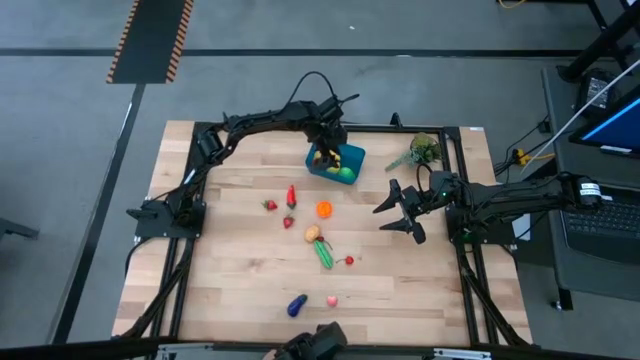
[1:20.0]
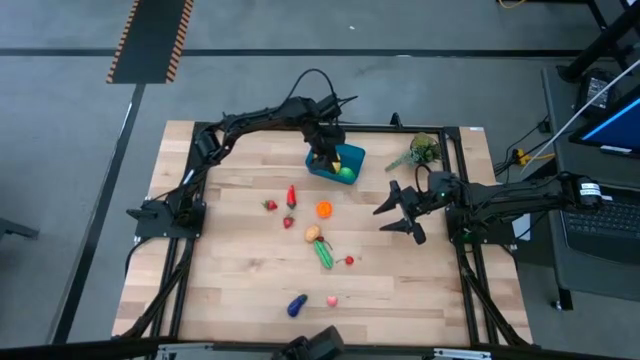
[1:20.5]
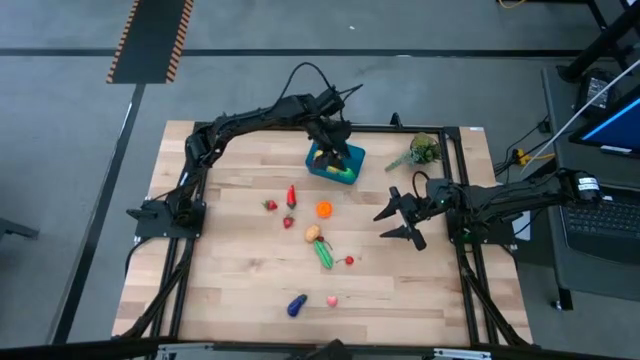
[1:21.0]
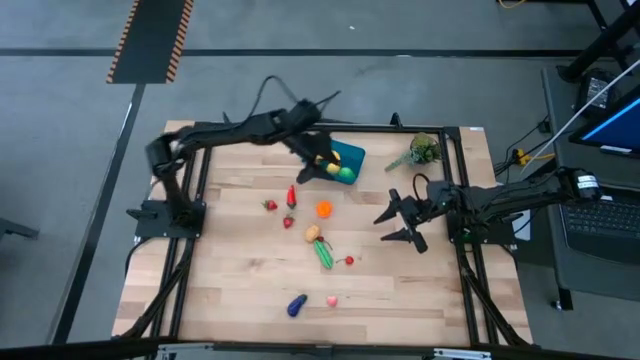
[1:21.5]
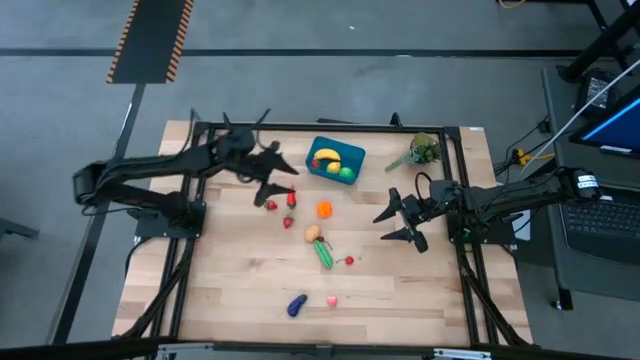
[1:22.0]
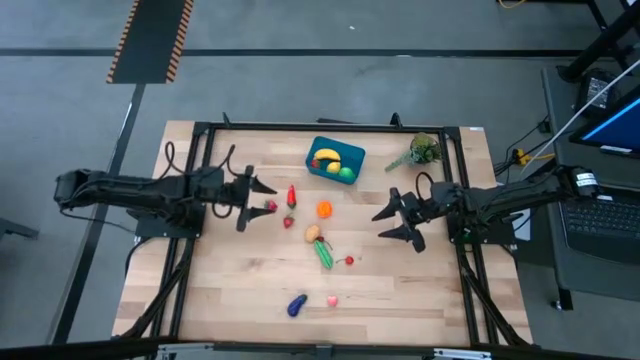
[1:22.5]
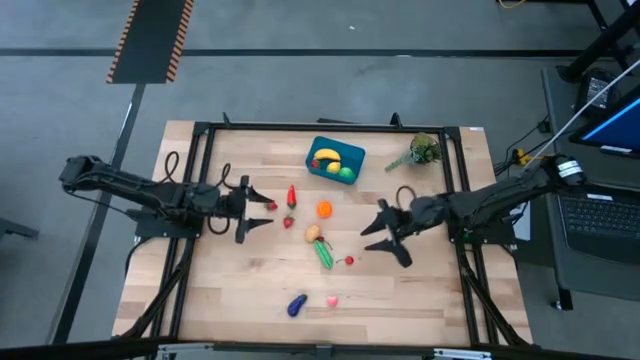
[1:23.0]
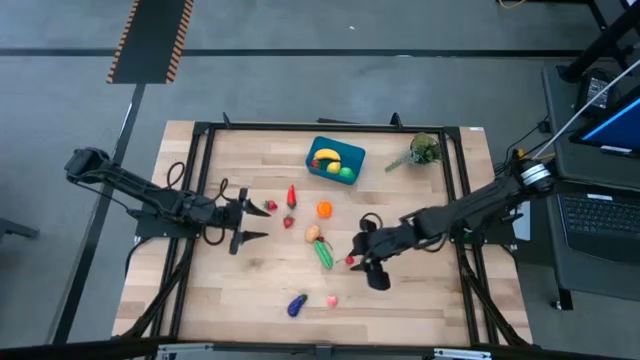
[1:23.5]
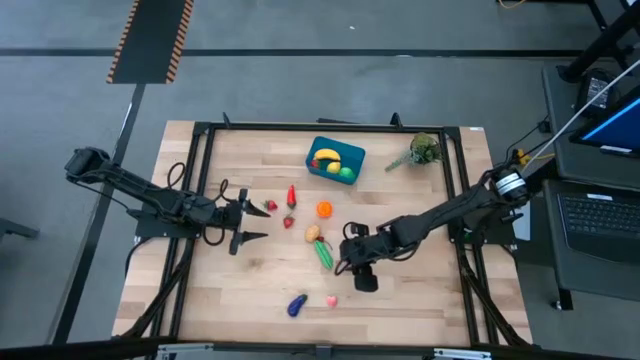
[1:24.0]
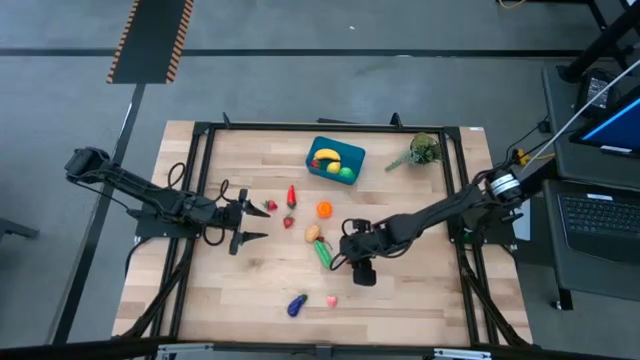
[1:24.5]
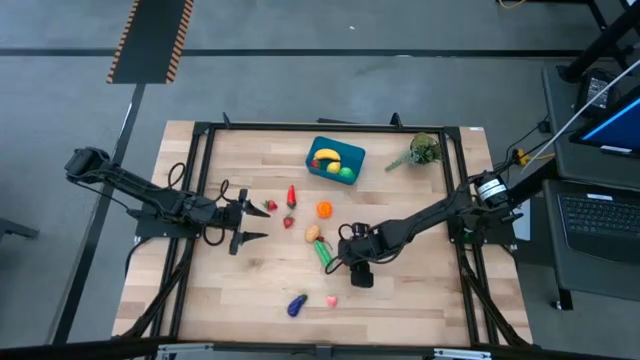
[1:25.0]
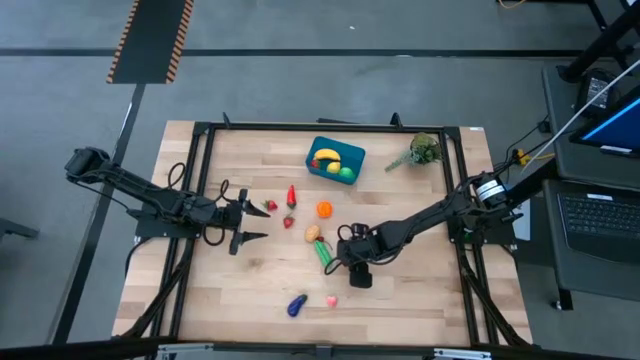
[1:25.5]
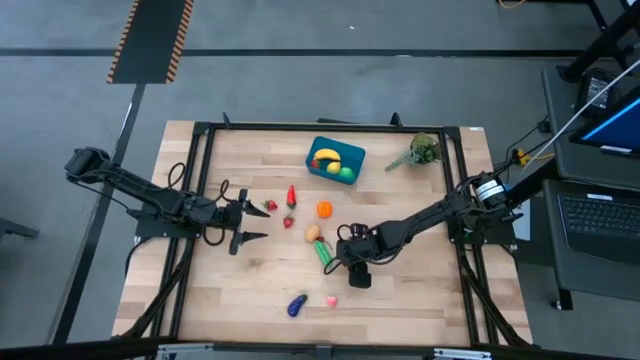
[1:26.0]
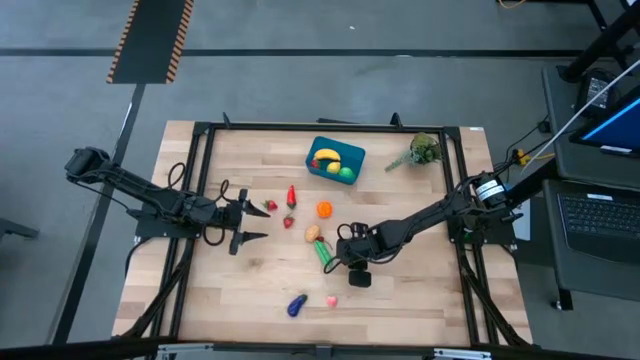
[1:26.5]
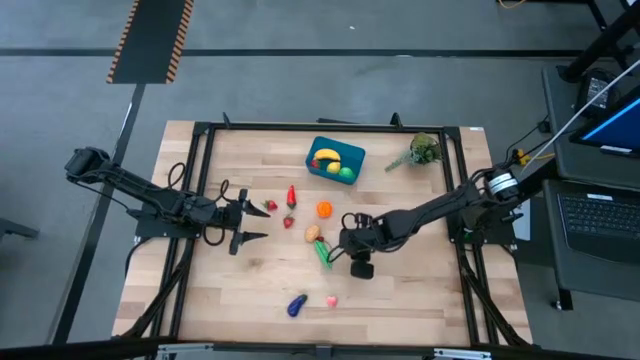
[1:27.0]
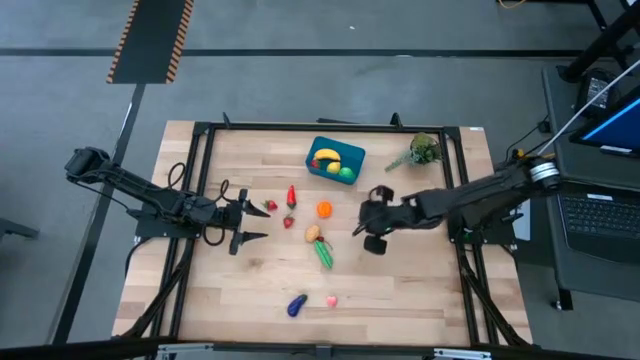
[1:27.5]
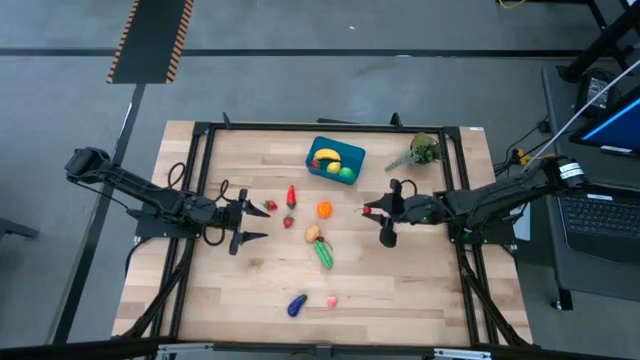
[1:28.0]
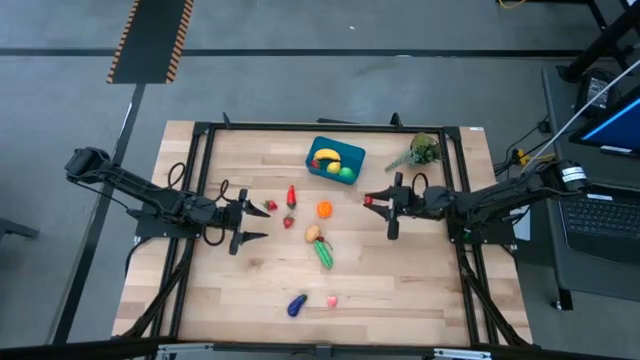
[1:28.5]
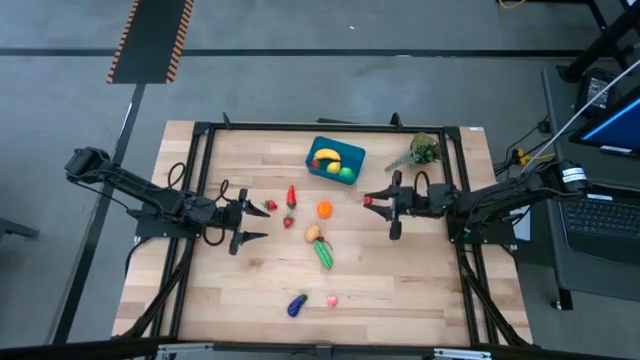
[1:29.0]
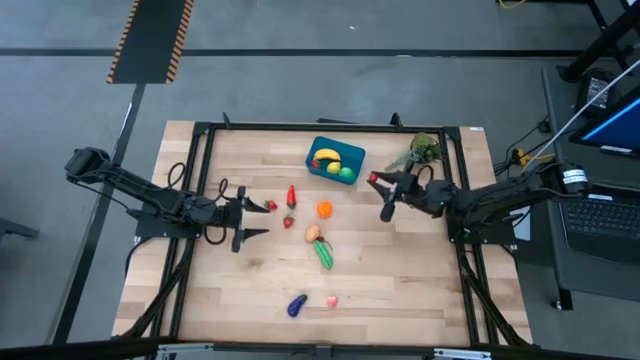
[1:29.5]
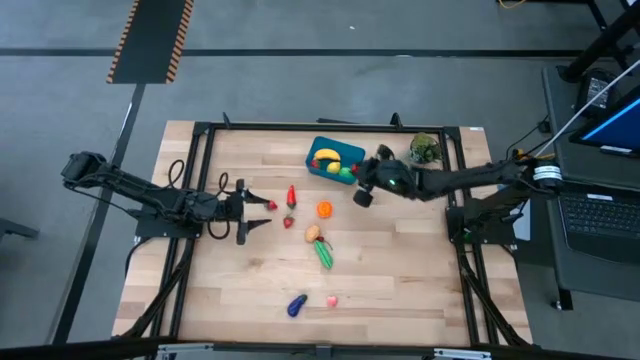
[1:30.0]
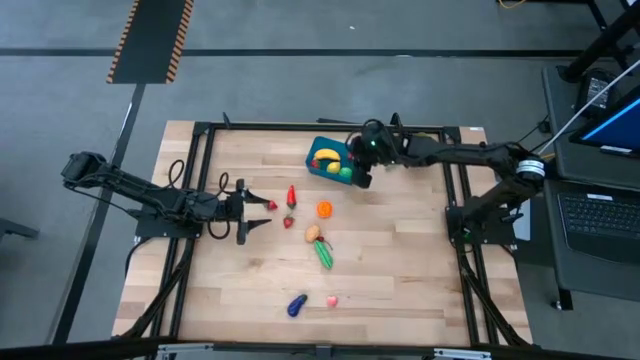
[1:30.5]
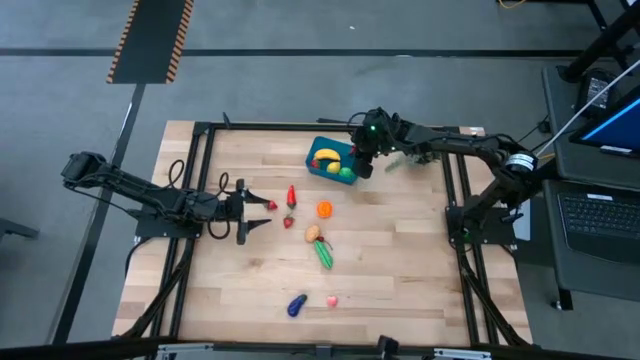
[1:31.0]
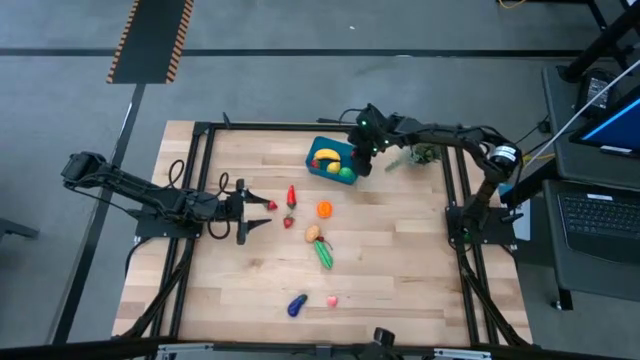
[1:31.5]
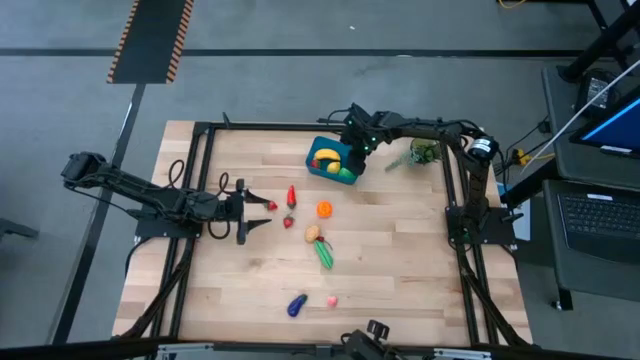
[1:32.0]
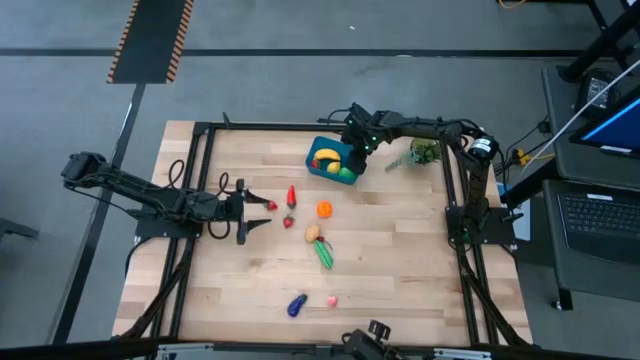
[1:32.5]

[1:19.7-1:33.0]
Task: Pick and placing Produce into tupperware
Put the bottom red cherry into the blue bin
